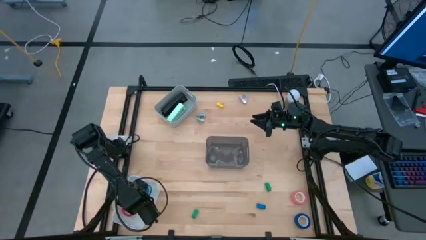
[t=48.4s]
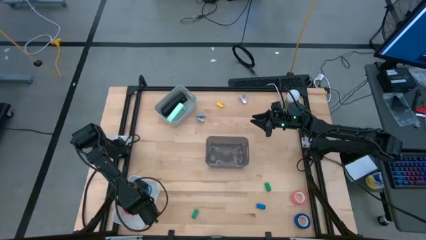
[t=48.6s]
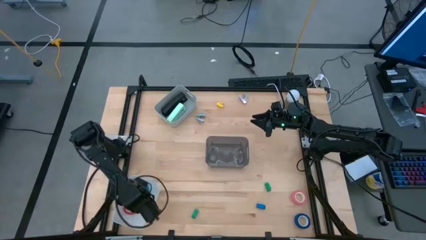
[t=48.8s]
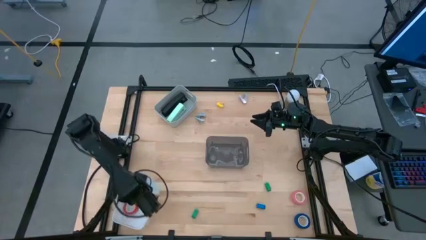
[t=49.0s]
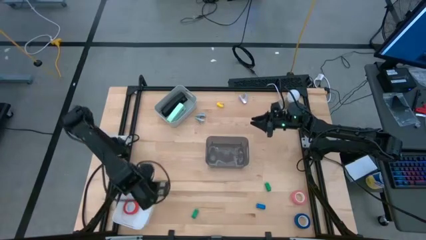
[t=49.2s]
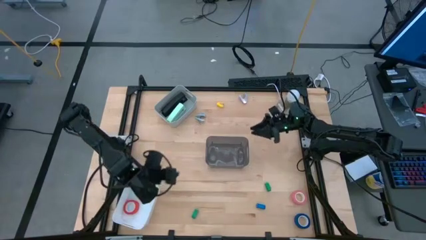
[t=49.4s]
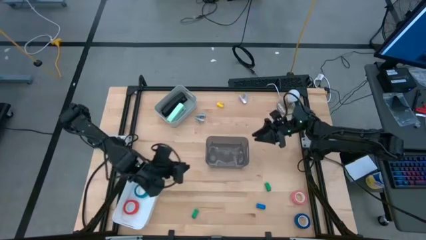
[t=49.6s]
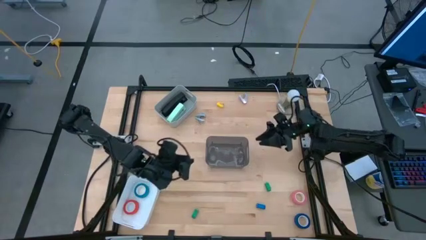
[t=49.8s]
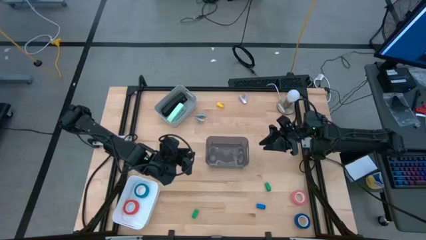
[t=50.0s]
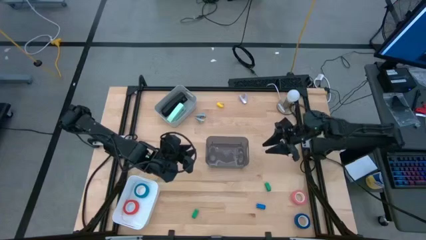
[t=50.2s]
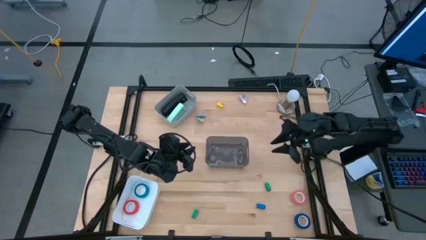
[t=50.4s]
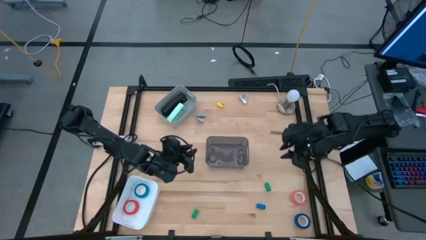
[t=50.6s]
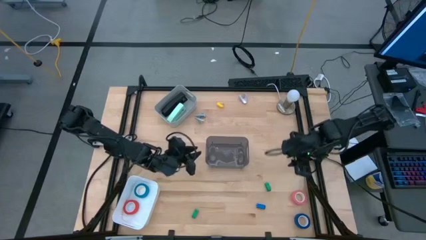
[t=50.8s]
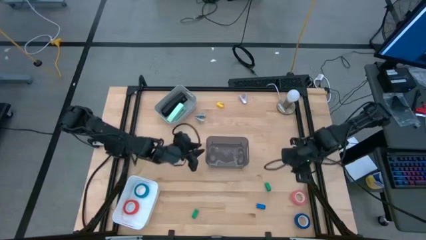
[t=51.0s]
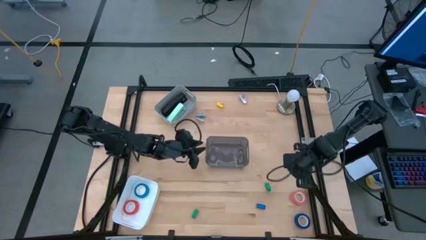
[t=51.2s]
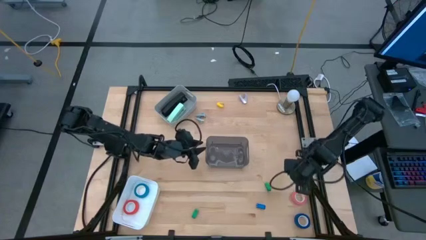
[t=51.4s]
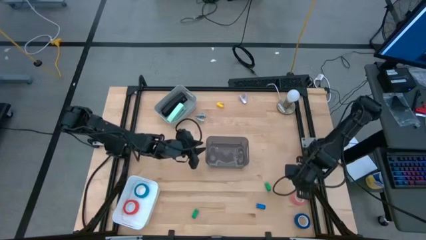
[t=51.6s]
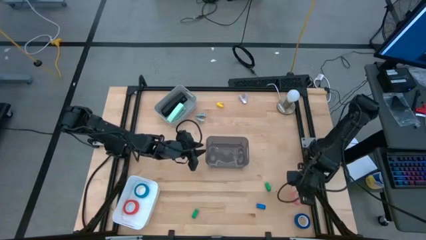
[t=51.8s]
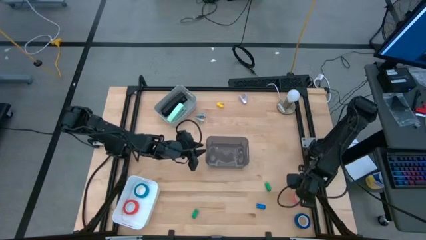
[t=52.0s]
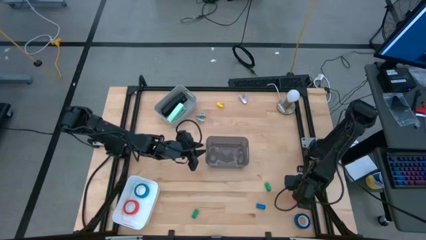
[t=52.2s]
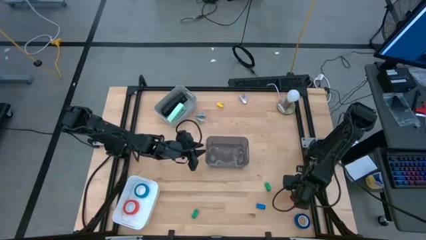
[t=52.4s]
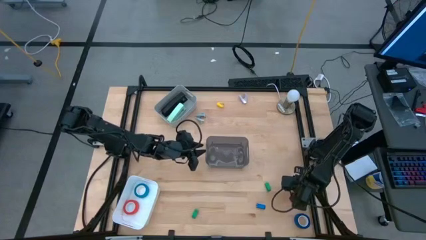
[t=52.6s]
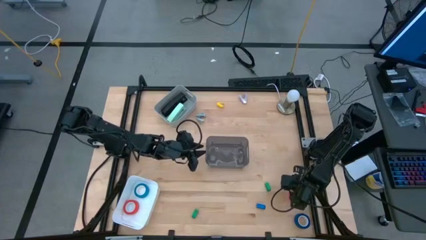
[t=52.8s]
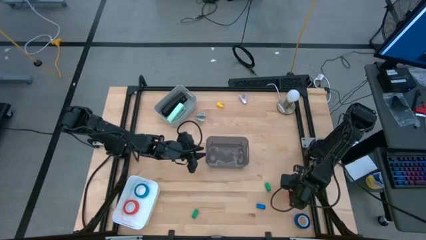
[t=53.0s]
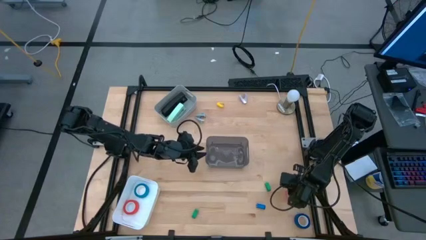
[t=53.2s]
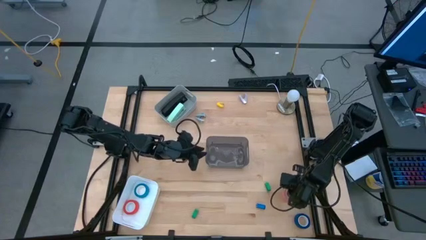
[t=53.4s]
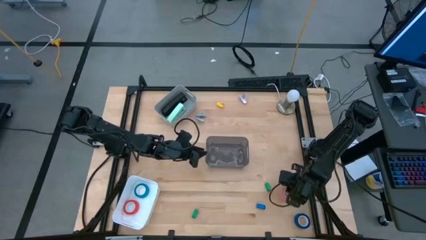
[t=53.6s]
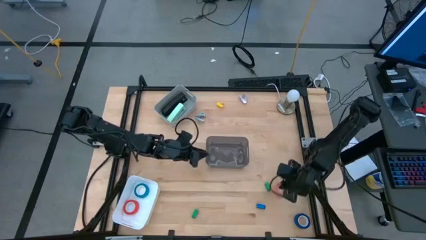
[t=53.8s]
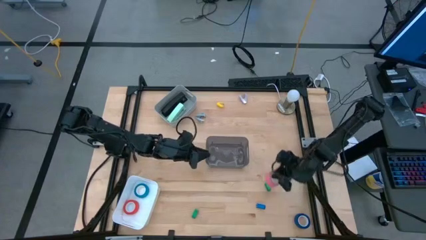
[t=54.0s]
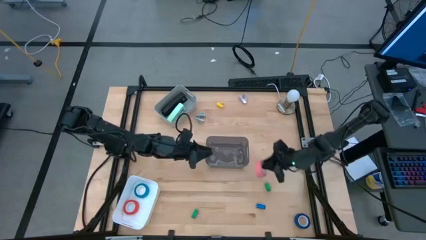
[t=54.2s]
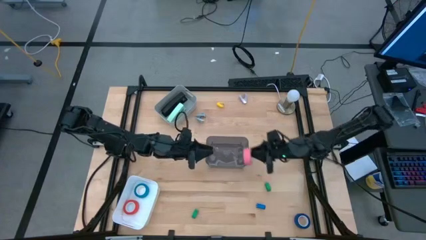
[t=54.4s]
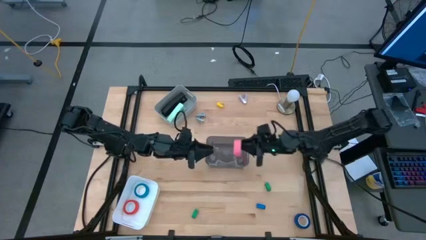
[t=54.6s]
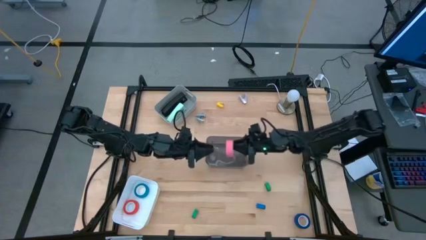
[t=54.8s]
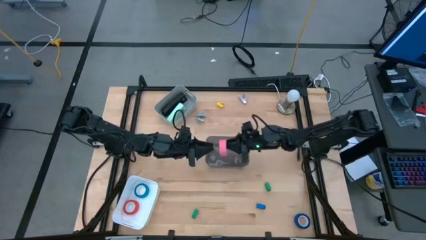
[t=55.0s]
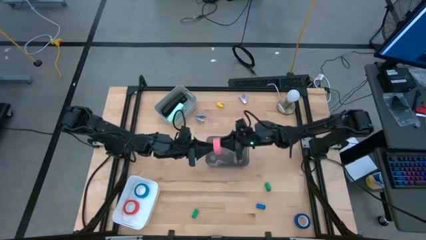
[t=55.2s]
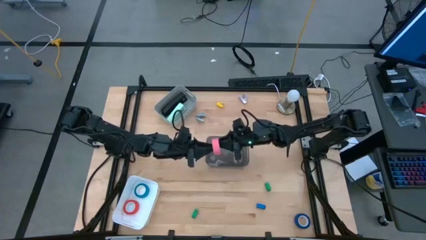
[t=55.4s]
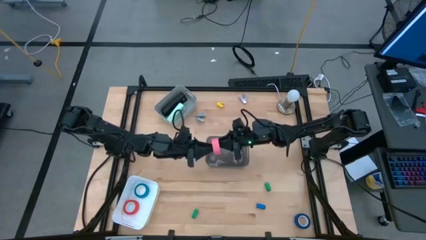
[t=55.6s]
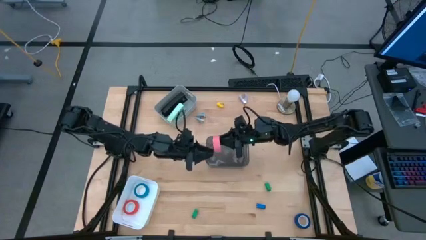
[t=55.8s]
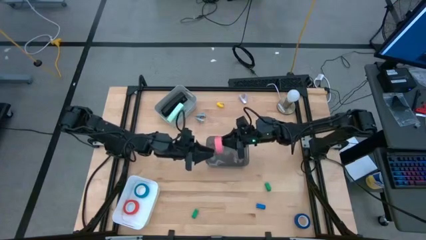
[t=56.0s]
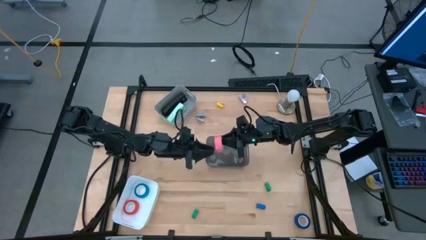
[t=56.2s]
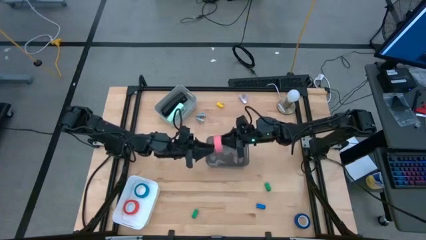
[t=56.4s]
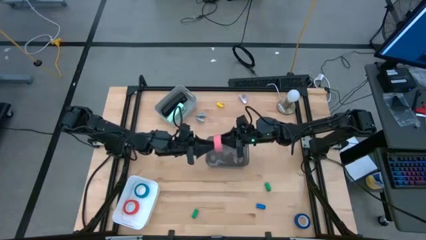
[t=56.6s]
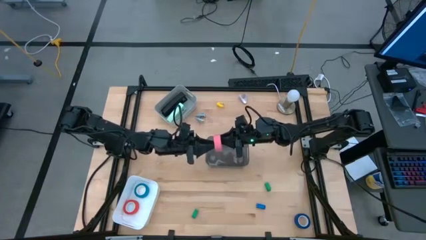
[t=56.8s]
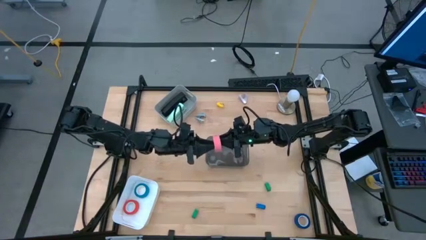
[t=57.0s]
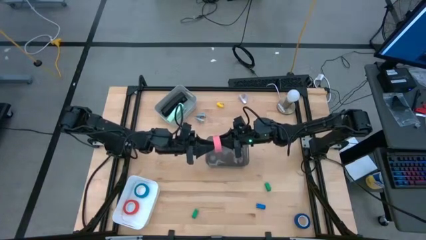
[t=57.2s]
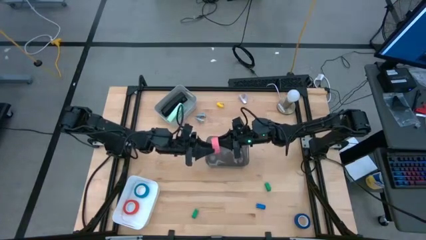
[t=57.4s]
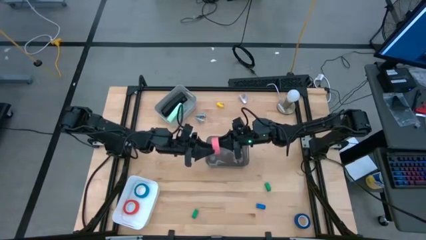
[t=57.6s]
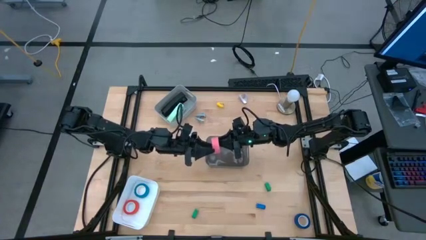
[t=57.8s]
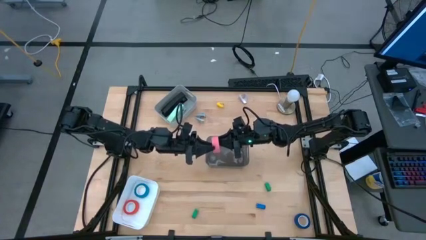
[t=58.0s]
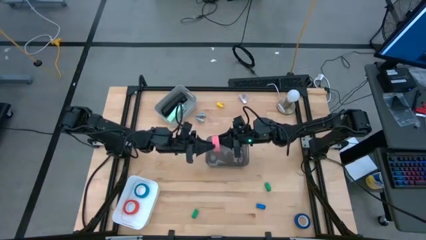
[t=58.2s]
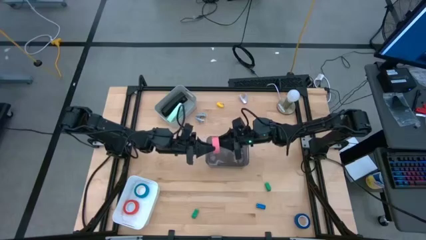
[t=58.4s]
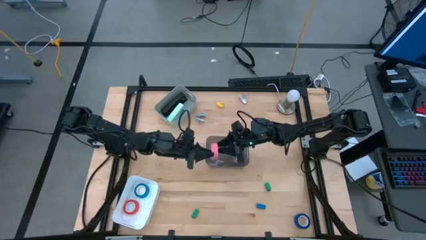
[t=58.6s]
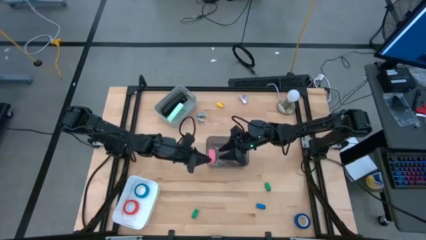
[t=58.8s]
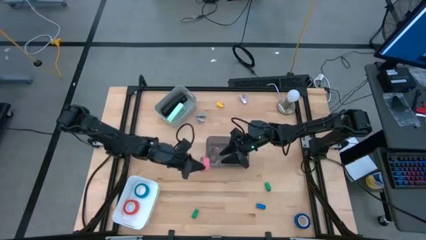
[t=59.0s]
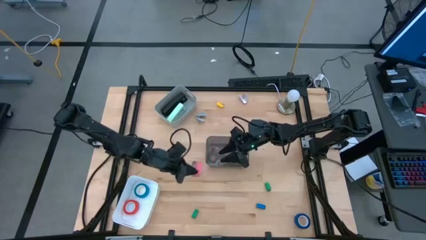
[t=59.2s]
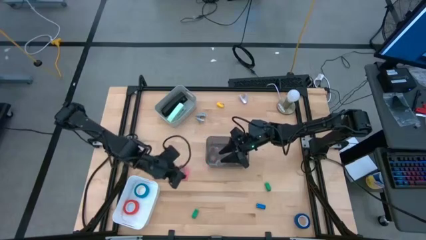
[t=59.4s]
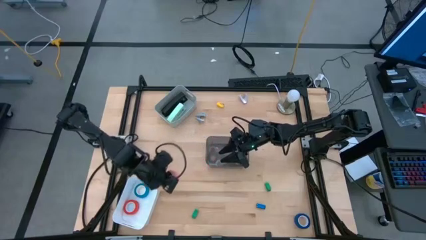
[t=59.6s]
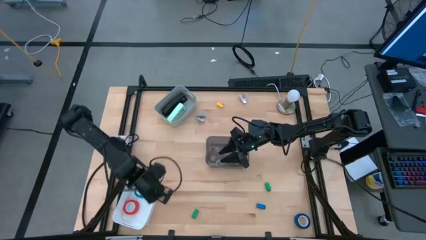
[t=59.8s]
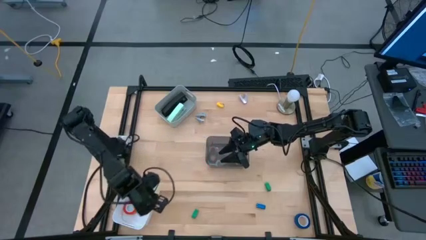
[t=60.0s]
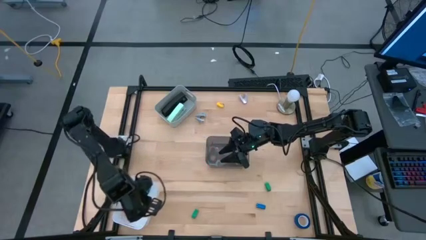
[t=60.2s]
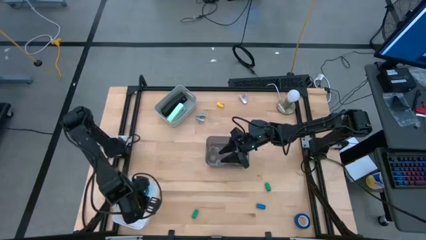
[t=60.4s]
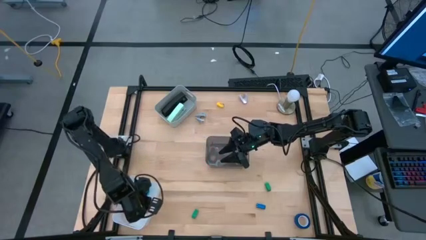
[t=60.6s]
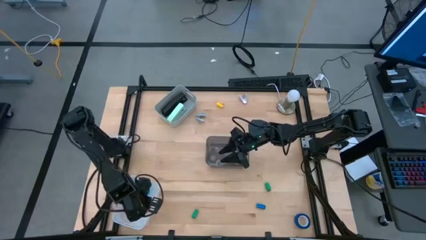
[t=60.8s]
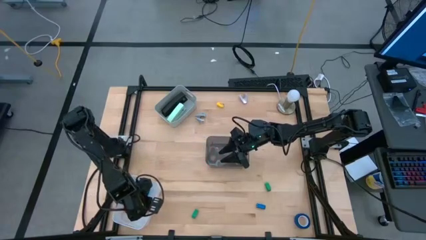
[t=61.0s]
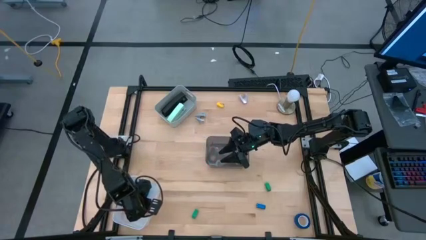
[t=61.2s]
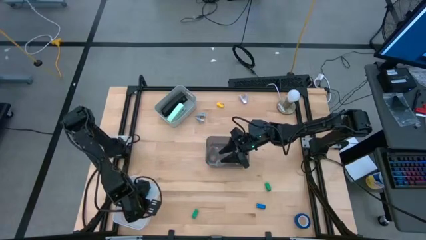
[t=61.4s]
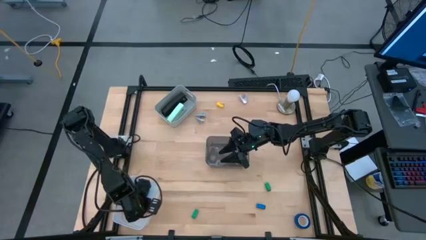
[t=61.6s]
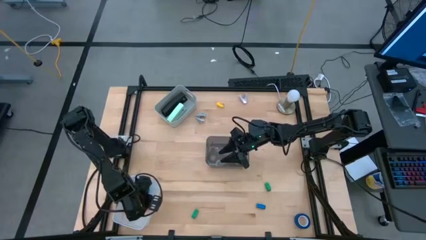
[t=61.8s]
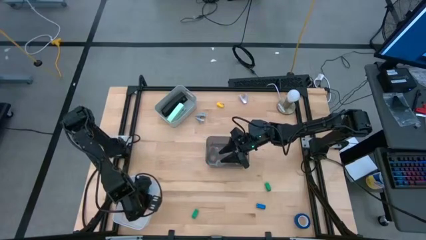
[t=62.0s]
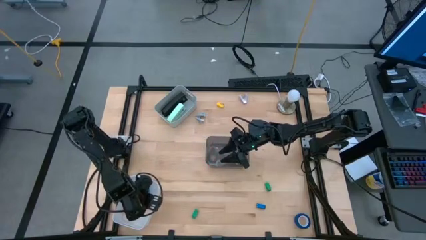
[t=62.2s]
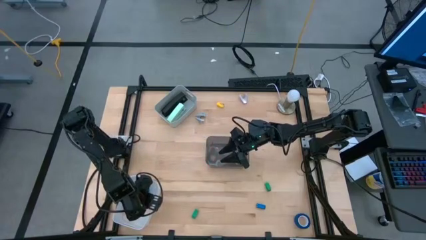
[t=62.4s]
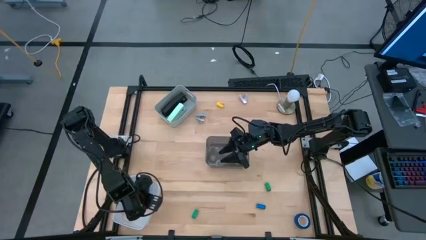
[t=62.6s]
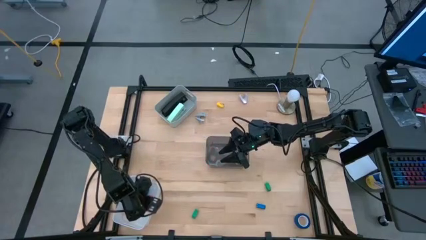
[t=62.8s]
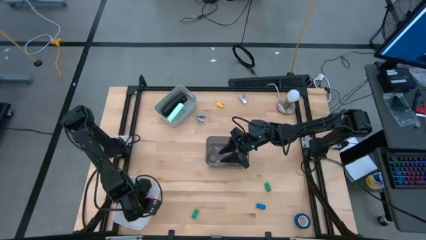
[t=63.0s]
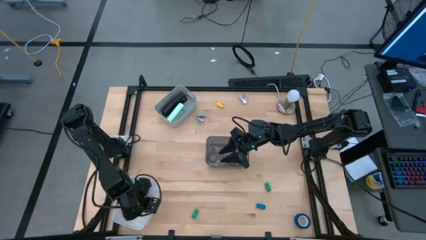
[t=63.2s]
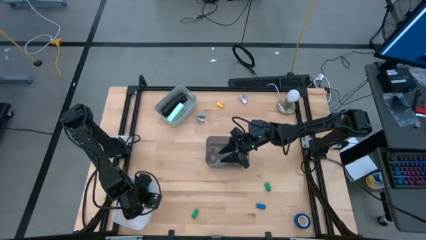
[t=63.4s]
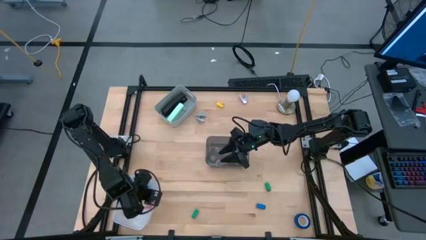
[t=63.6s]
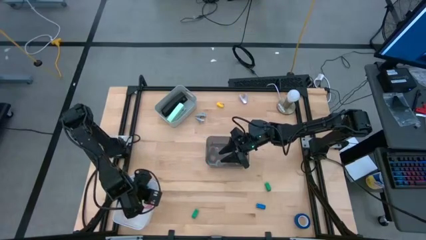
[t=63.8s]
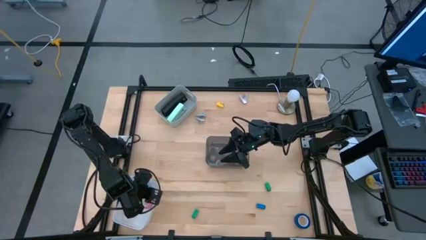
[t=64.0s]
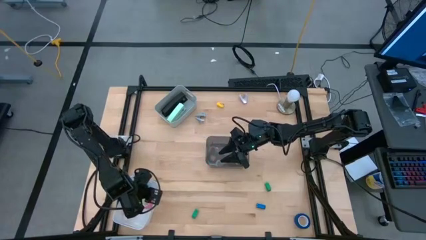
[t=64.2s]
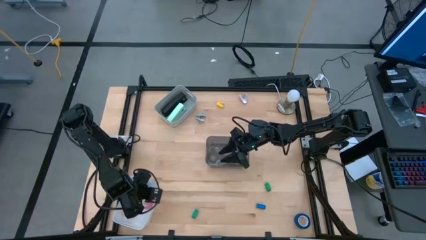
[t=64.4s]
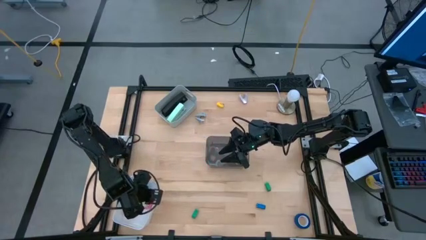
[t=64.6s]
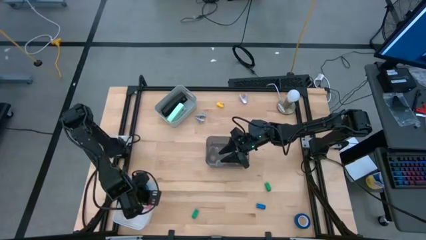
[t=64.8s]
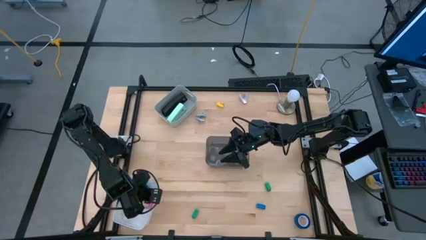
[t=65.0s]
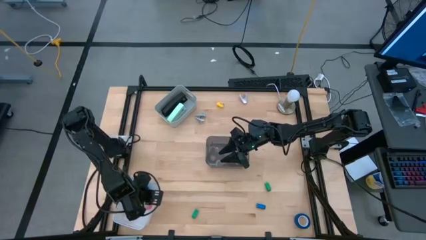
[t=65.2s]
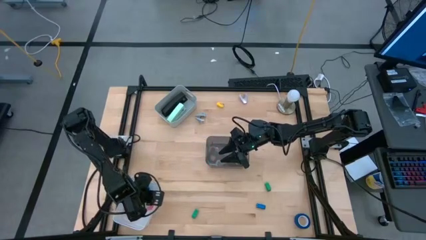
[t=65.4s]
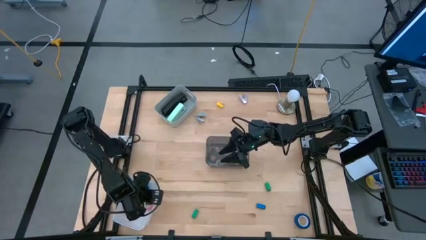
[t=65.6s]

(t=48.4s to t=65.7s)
Task: Pick and place Stapler, Stapler remover, tape
Put the pink tape into the white bin
